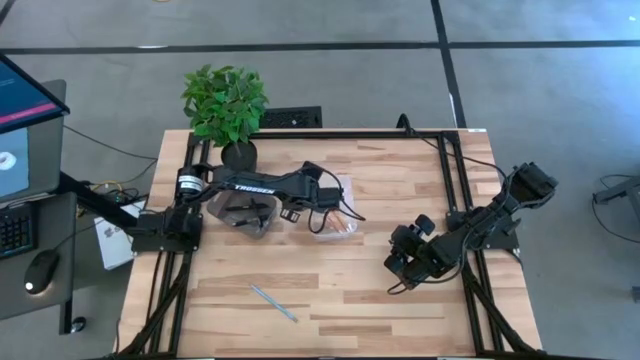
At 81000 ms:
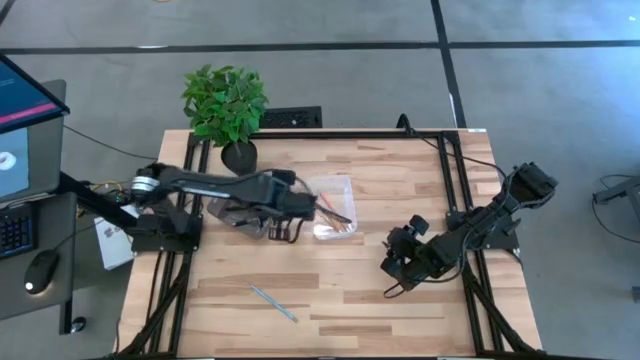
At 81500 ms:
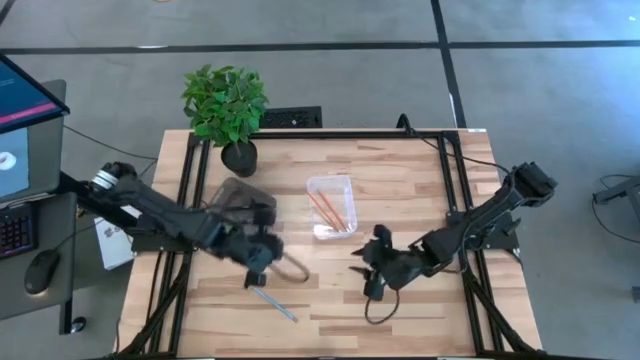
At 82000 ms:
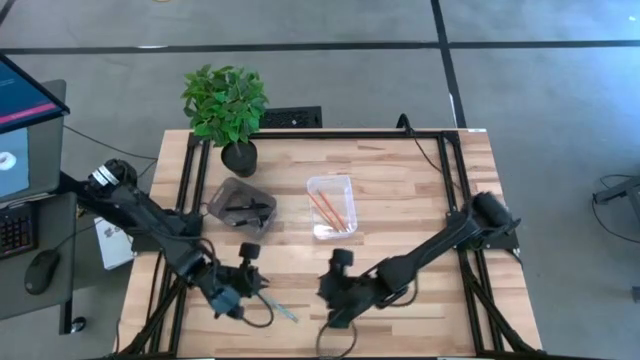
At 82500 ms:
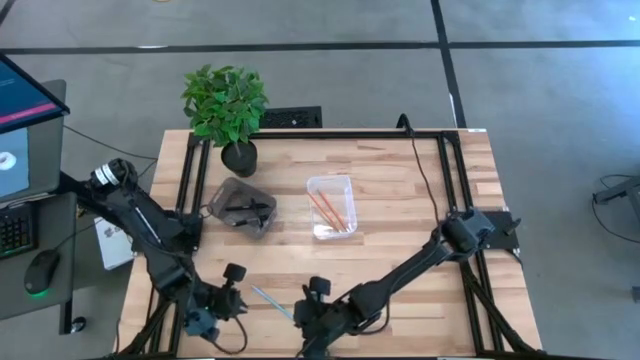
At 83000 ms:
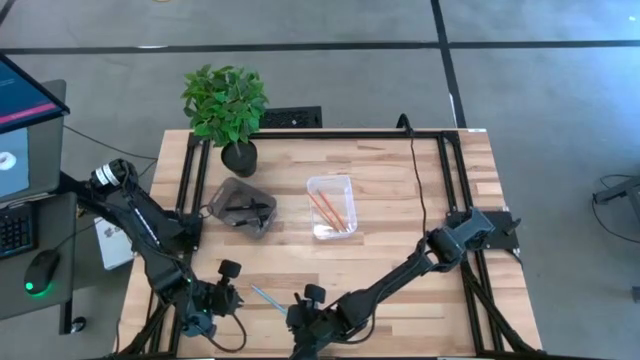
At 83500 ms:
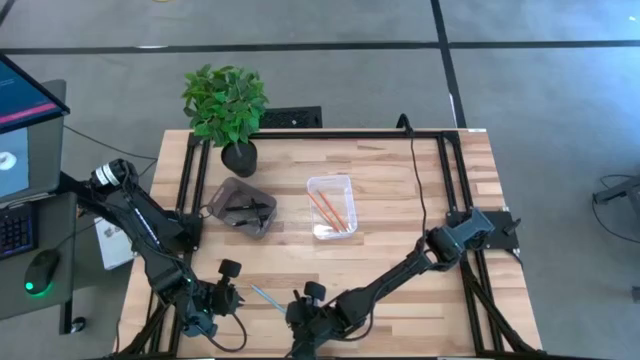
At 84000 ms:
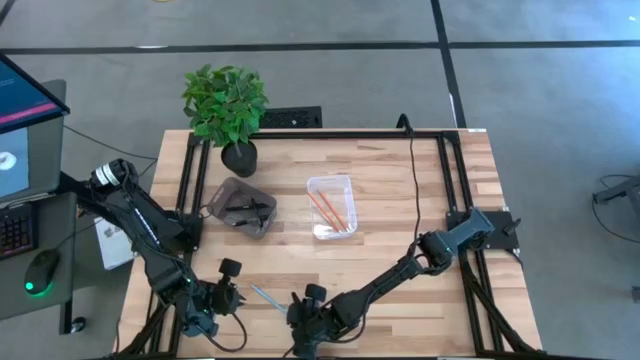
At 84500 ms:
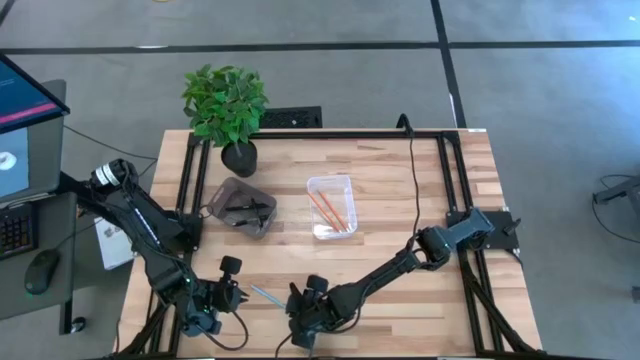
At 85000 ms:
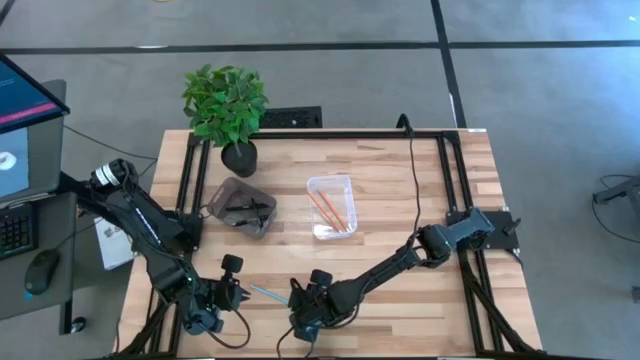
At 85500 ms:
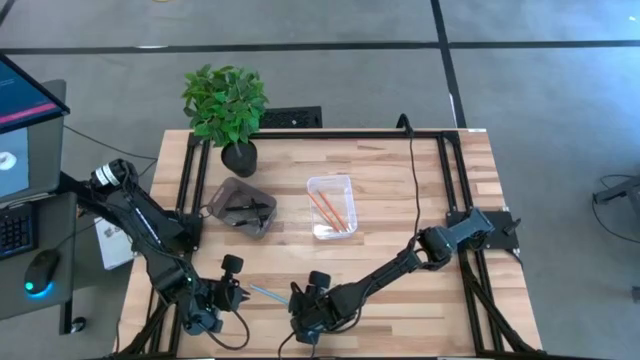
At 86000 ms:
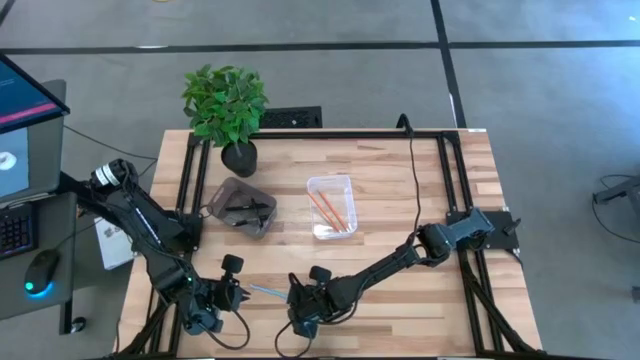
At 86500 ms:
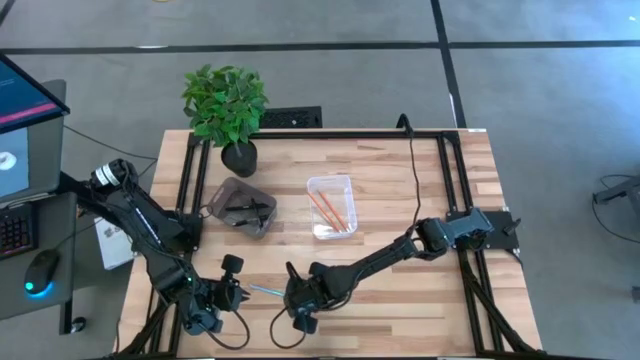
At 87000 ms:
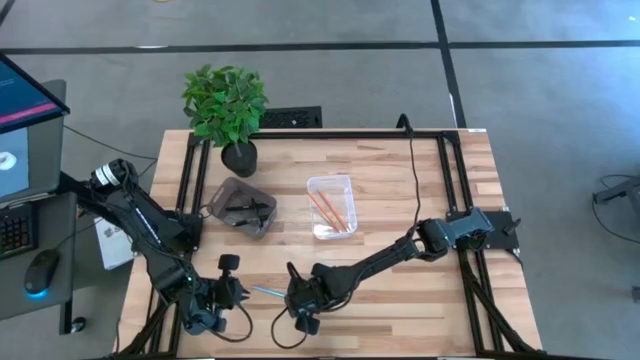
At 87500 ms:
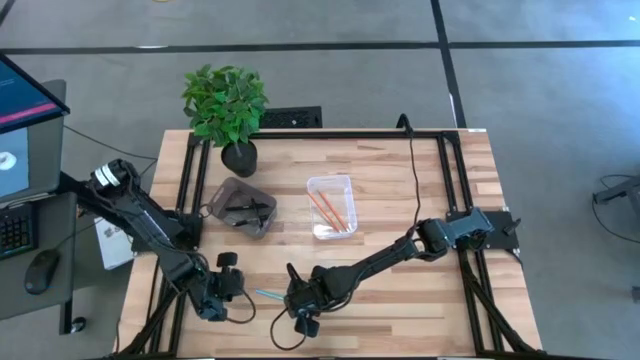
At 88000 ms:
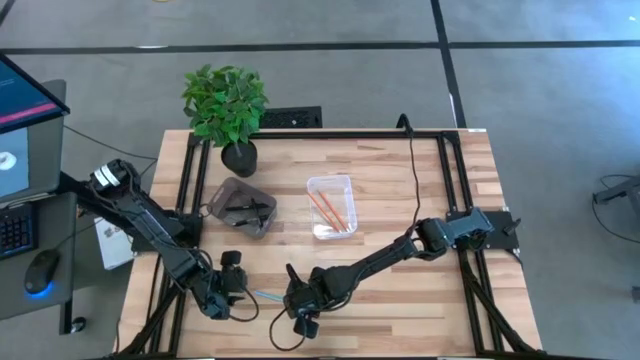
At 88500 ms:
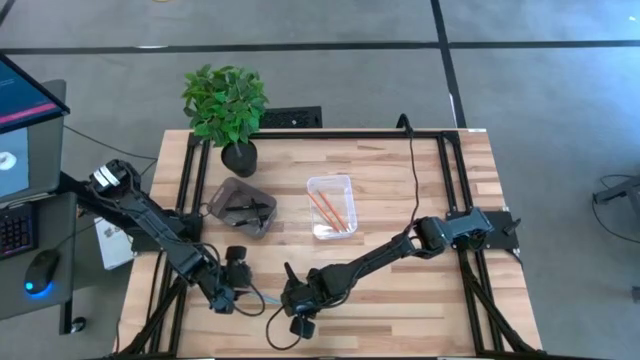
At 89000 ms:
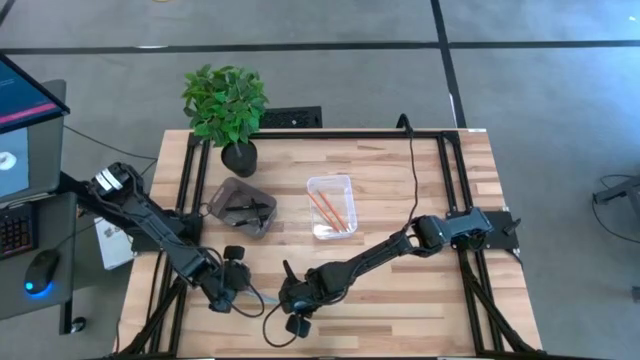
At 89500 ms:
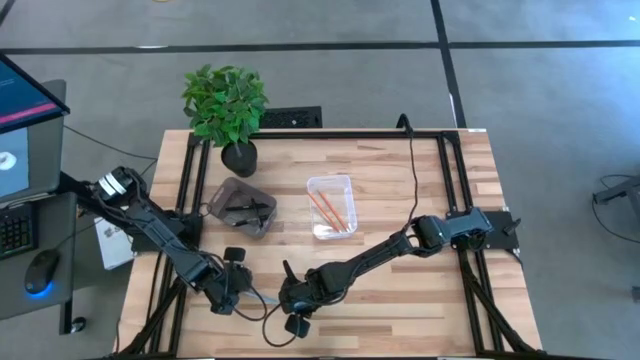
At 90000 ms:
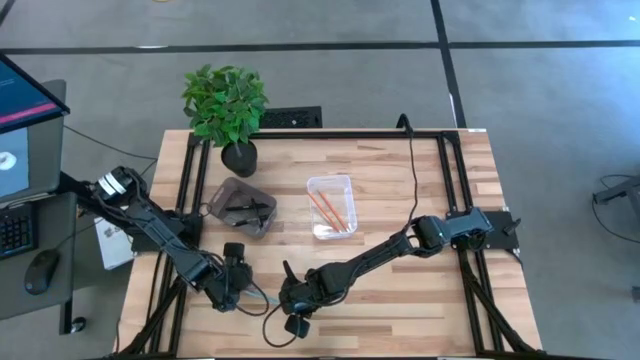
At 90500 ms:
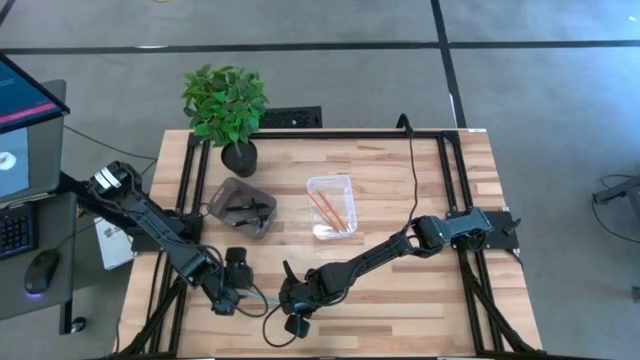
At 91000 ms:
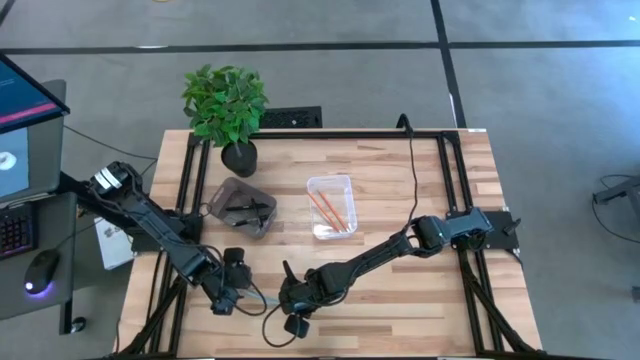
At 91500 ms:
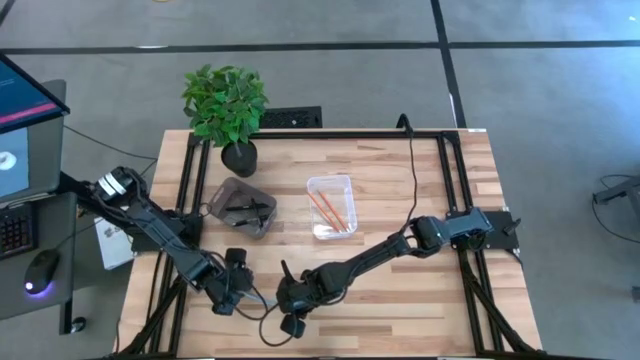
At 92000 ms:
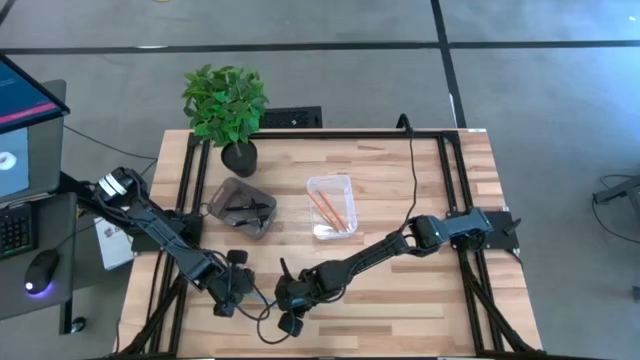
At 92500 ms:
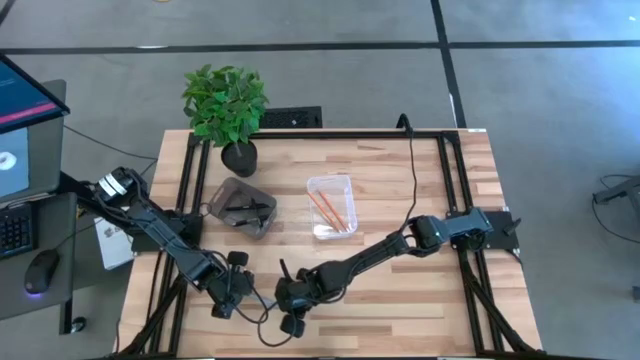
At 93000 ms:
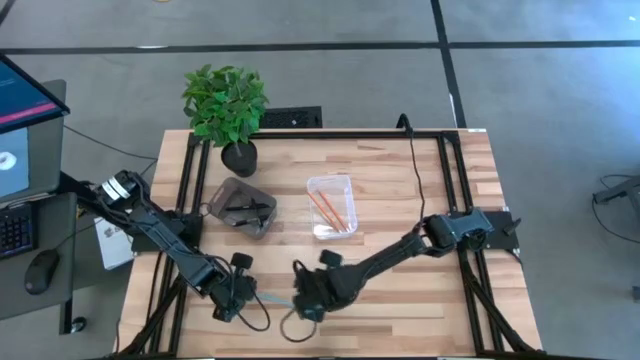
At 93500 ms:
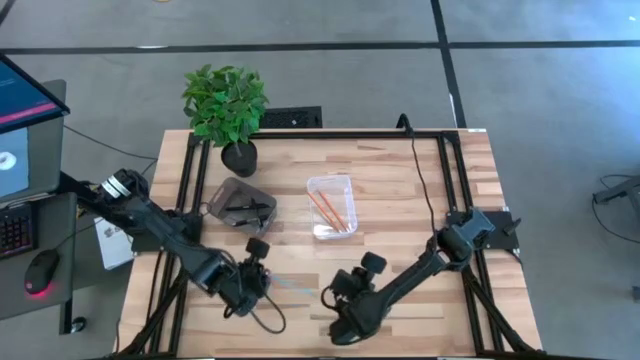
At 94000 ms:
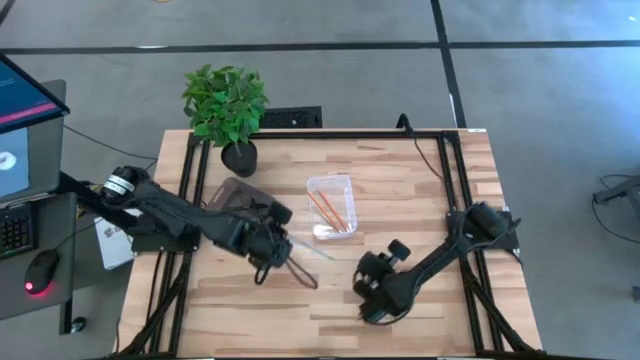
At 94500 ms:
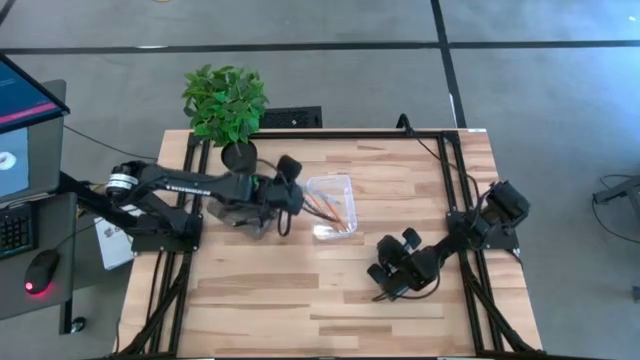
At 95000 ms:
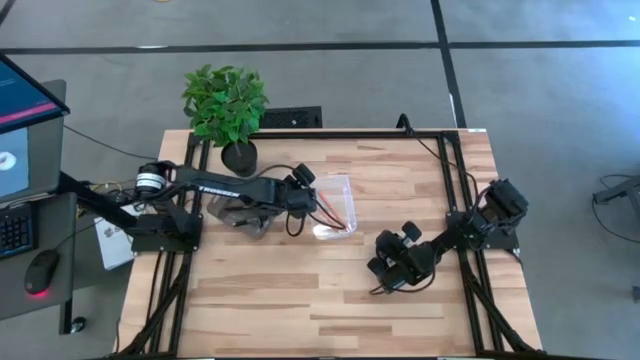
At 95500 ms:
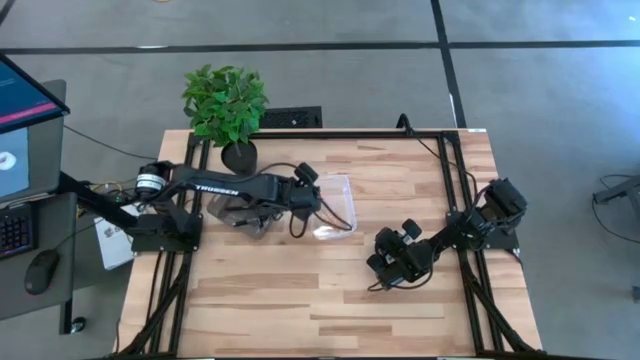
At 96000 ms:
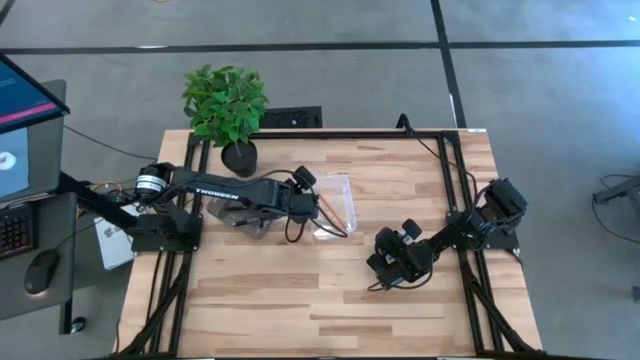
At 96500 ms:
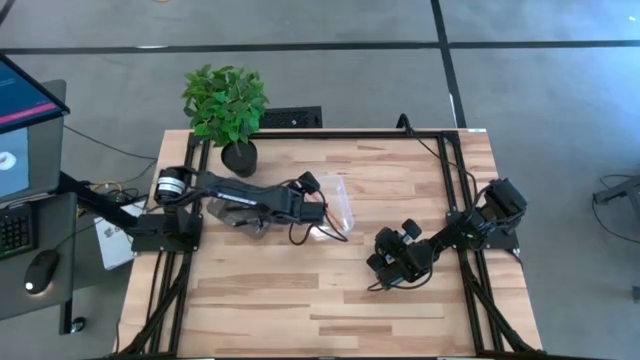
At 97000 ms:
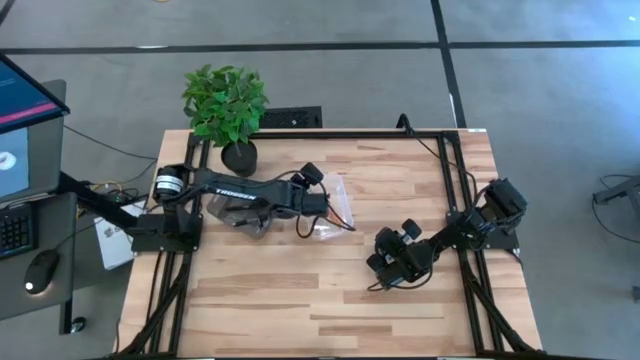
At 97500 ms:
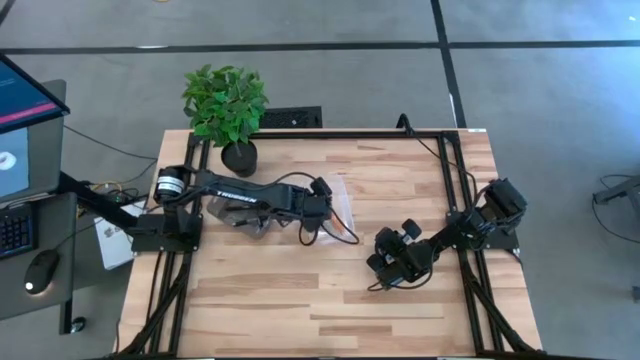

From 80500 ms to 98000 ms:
Task: Sort pens & pencils
Put the blue pencil into the white bin

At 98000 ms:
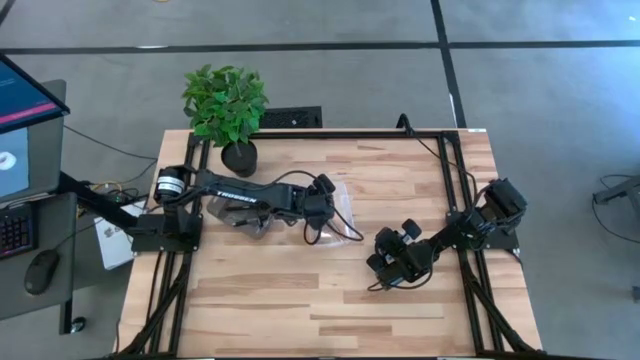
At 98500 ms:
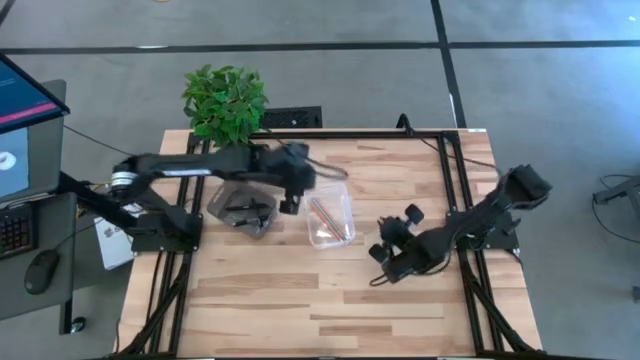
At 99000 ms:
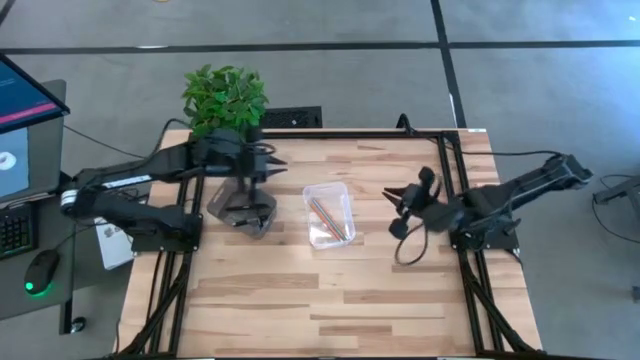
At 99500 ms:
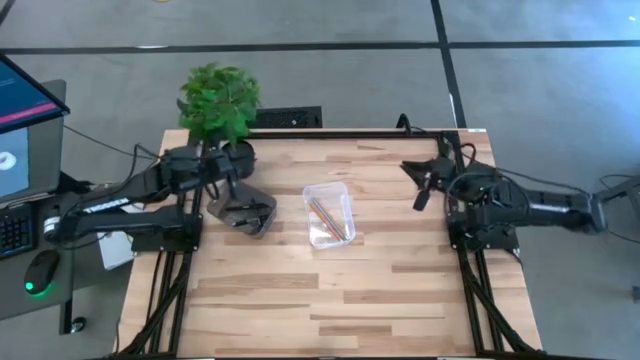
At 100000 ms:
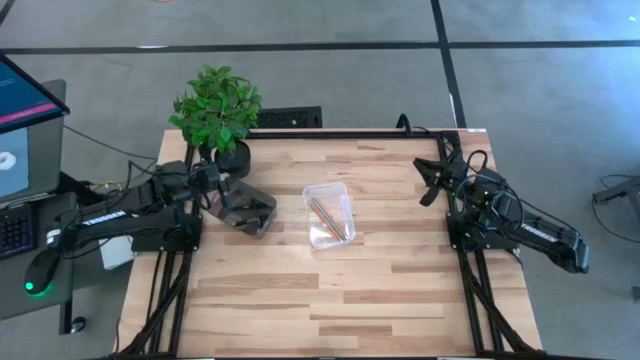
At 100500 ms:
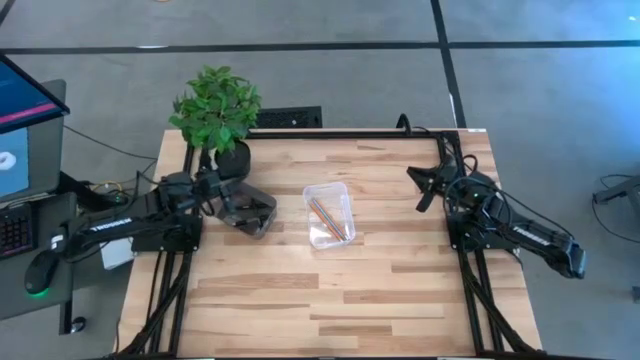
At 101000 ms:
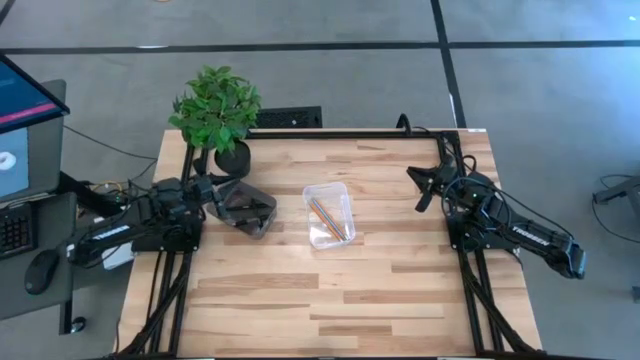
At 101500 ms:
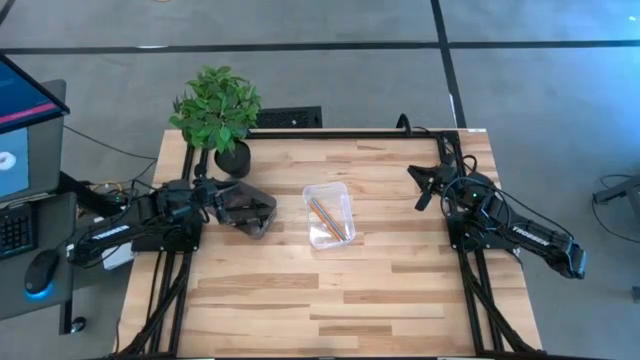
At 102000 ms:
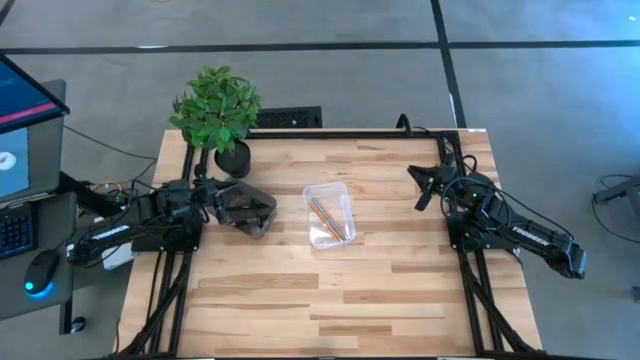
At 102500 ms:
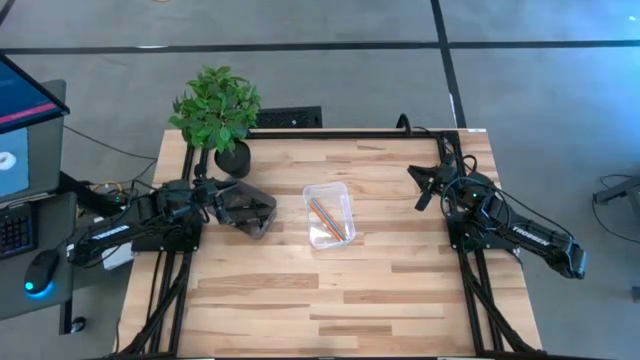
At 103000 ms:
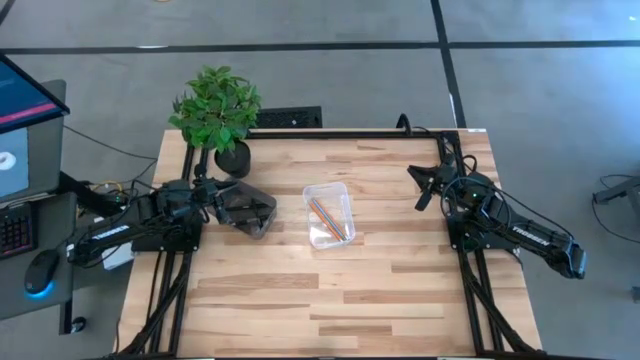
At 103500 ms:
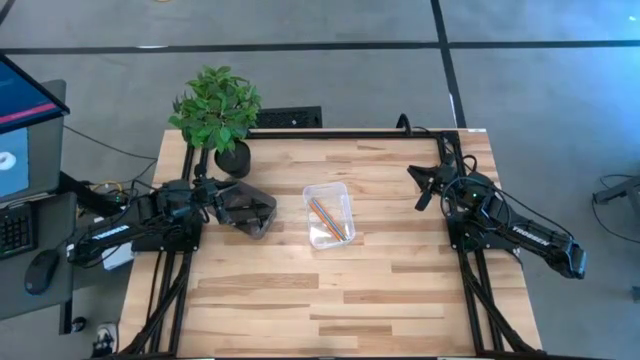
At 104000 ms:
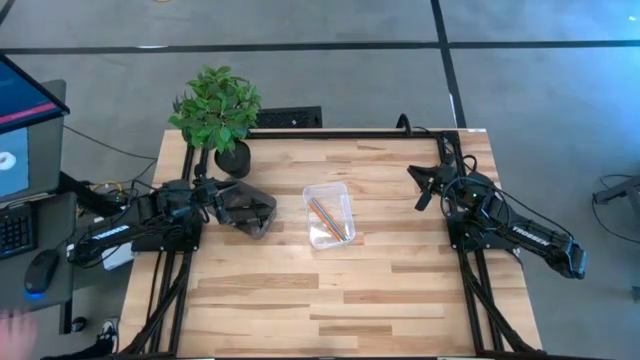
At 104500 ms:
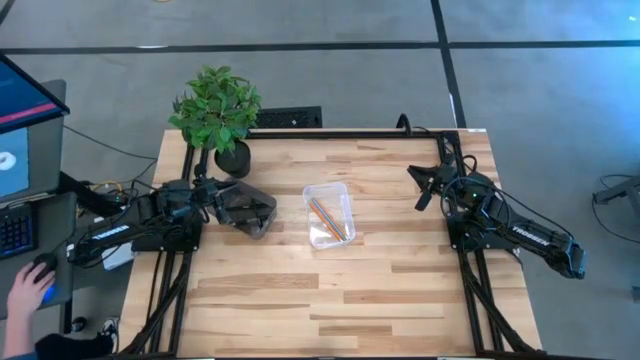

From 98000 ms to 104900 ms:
Return to Home Position
